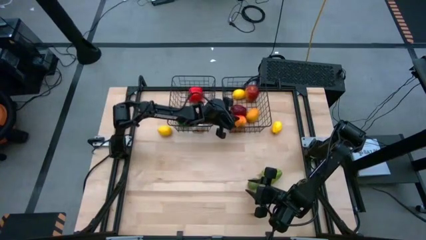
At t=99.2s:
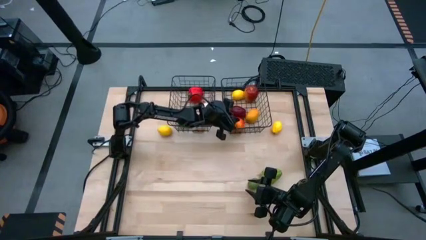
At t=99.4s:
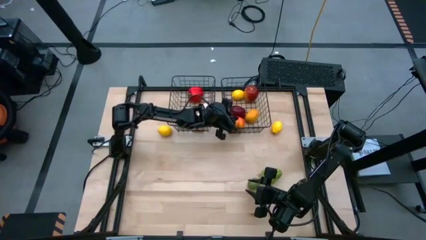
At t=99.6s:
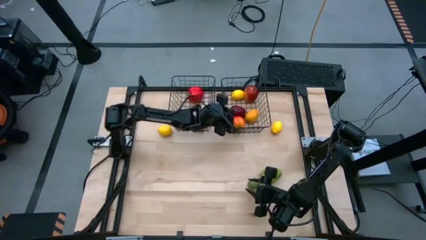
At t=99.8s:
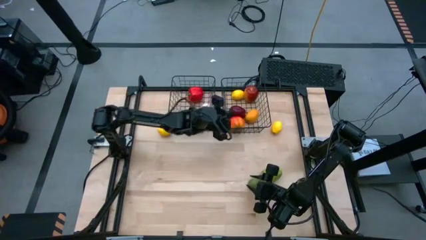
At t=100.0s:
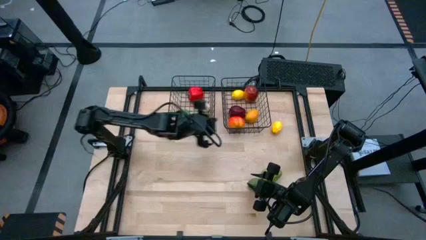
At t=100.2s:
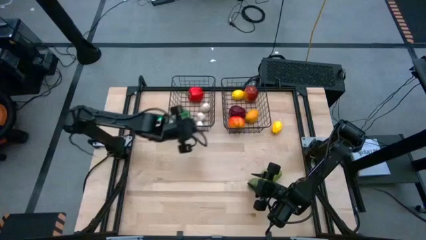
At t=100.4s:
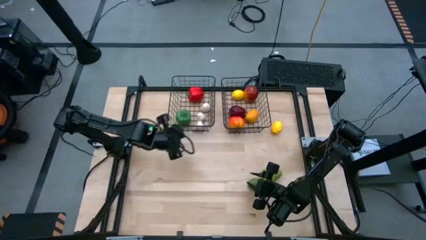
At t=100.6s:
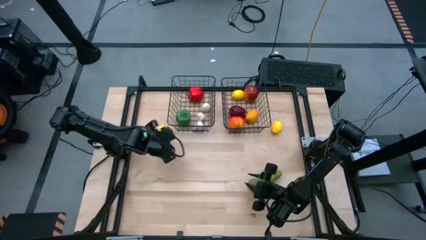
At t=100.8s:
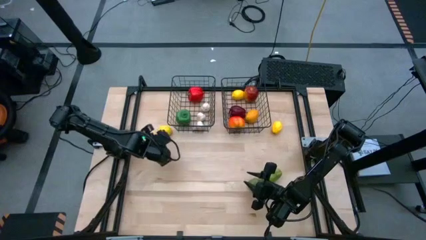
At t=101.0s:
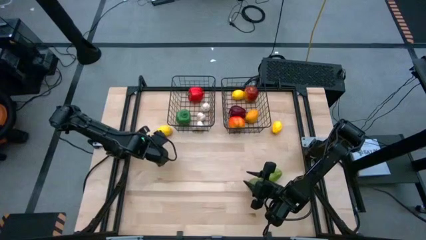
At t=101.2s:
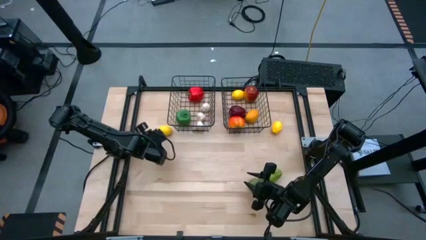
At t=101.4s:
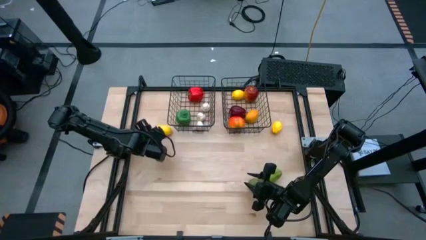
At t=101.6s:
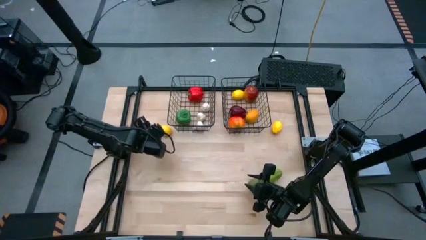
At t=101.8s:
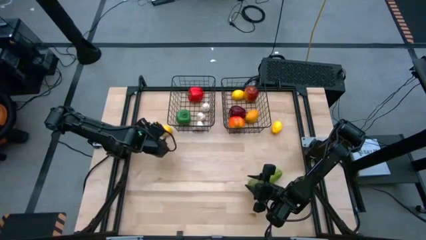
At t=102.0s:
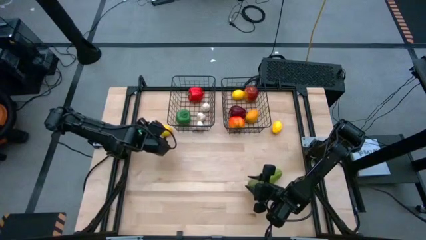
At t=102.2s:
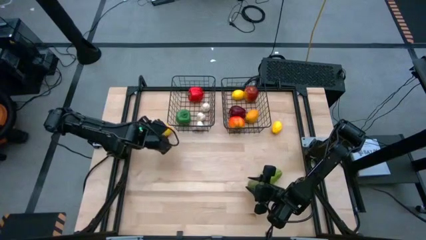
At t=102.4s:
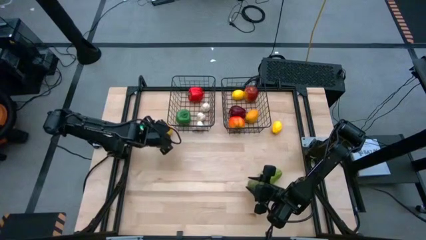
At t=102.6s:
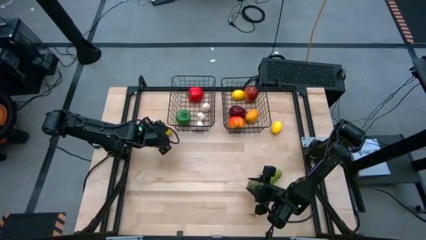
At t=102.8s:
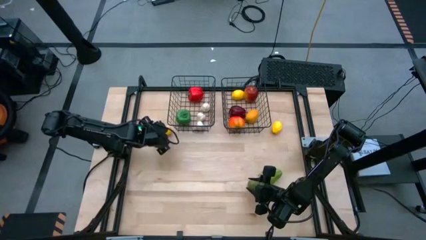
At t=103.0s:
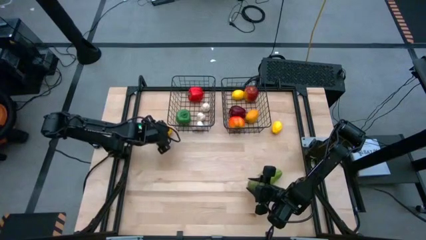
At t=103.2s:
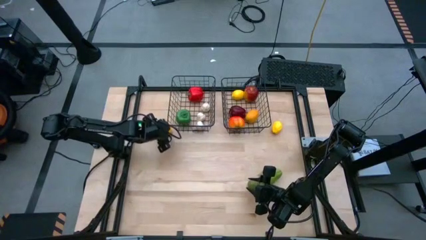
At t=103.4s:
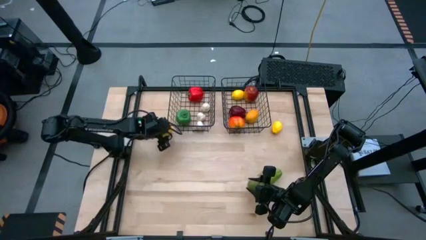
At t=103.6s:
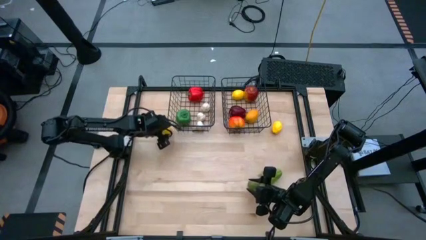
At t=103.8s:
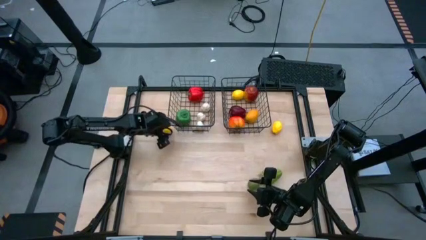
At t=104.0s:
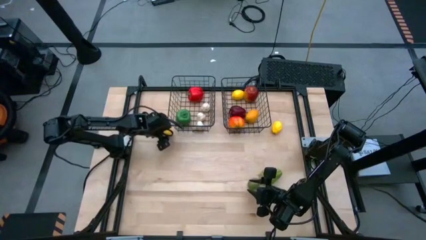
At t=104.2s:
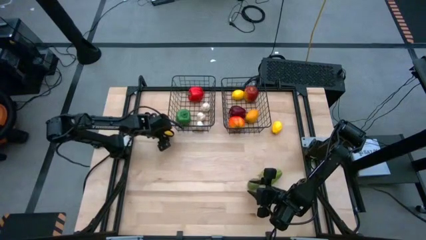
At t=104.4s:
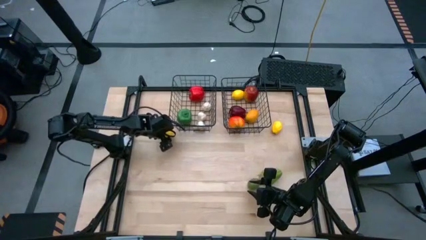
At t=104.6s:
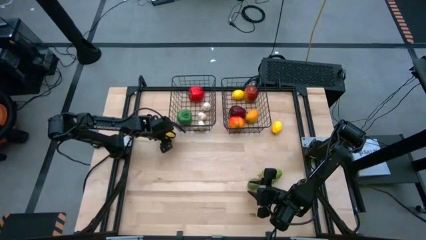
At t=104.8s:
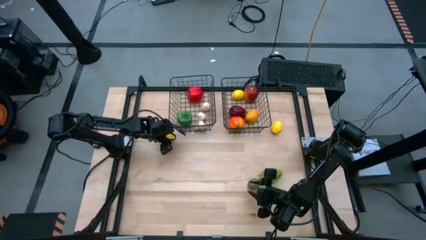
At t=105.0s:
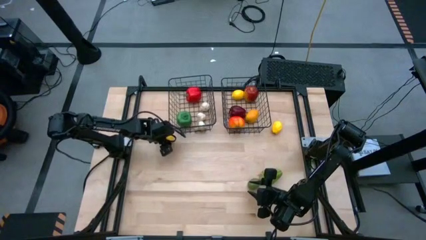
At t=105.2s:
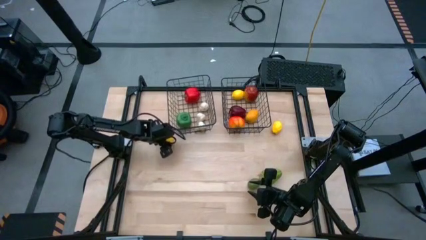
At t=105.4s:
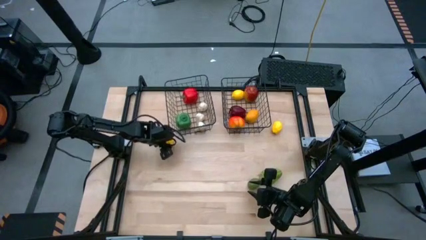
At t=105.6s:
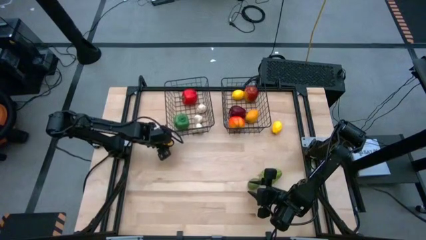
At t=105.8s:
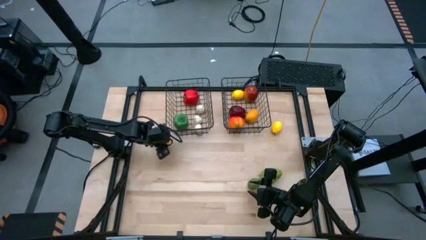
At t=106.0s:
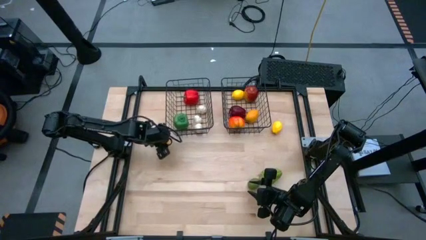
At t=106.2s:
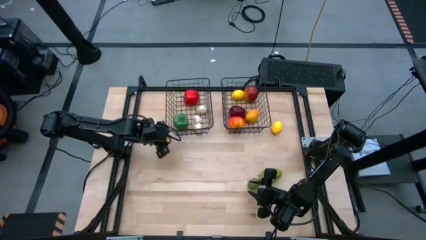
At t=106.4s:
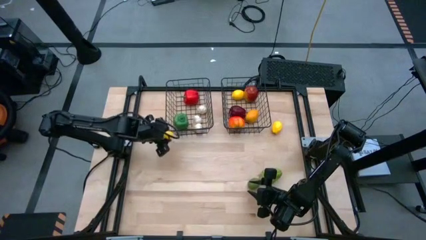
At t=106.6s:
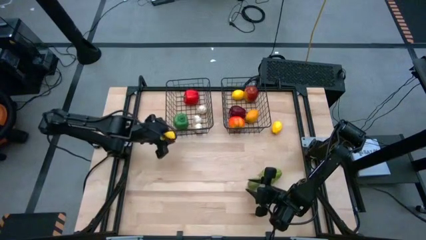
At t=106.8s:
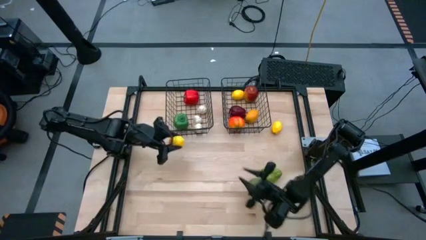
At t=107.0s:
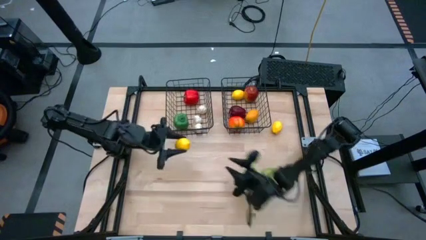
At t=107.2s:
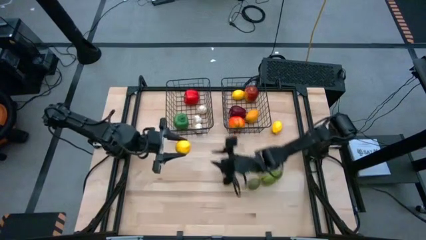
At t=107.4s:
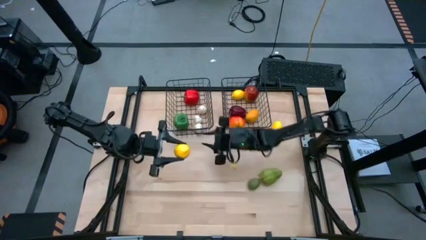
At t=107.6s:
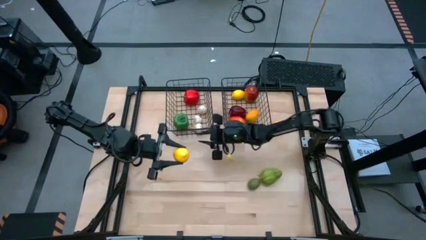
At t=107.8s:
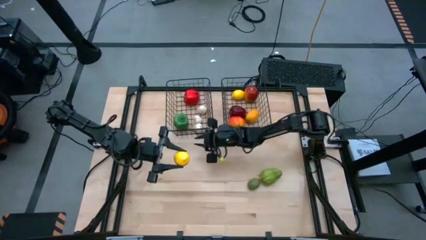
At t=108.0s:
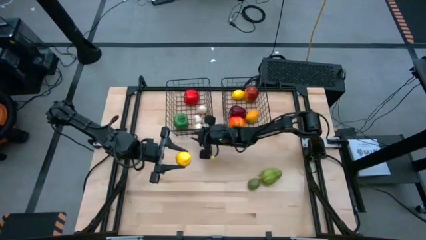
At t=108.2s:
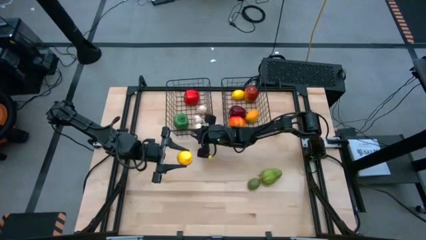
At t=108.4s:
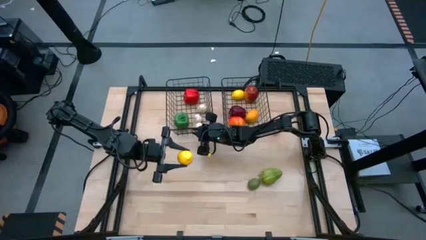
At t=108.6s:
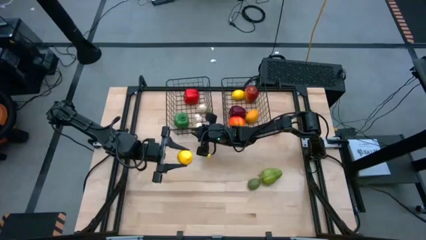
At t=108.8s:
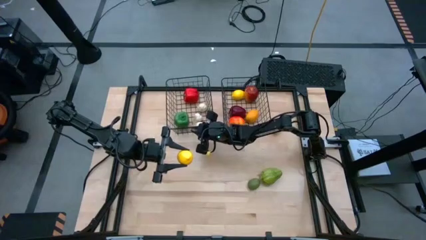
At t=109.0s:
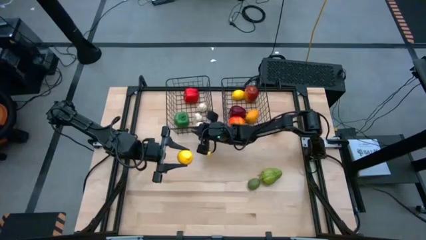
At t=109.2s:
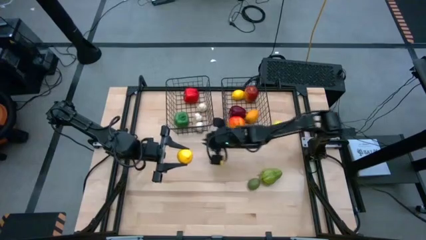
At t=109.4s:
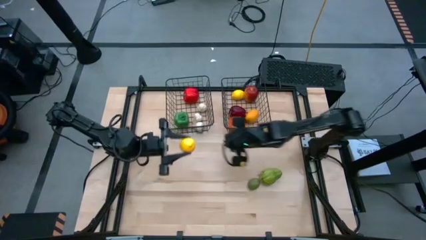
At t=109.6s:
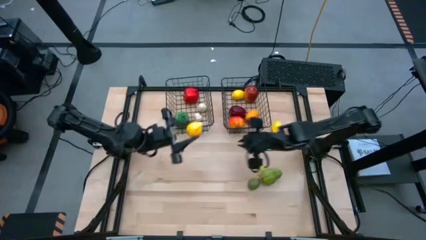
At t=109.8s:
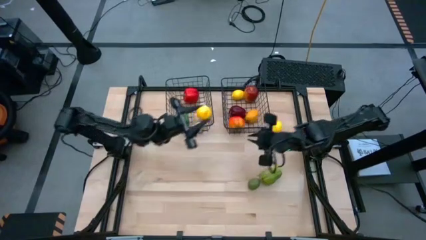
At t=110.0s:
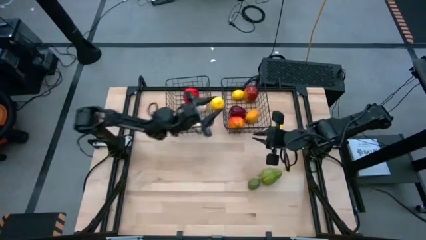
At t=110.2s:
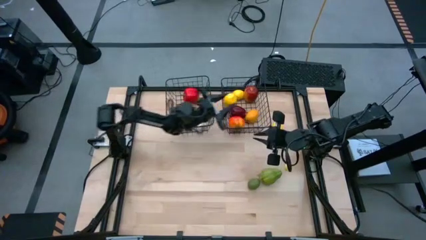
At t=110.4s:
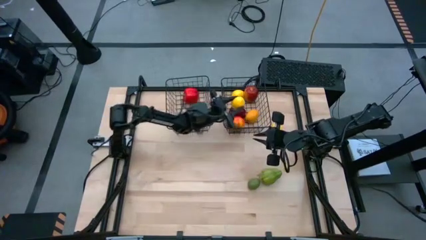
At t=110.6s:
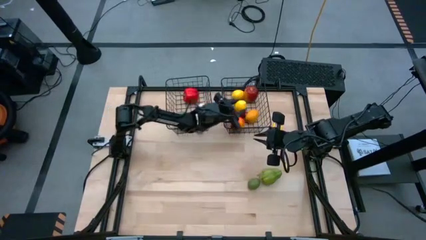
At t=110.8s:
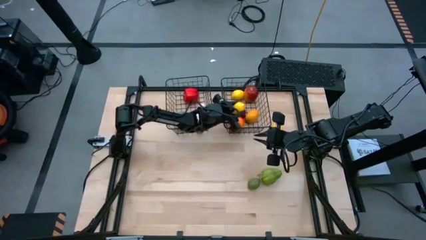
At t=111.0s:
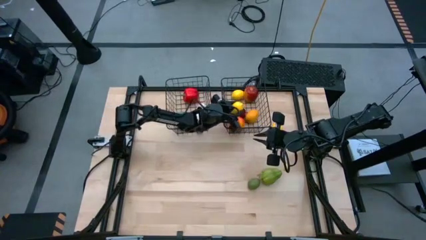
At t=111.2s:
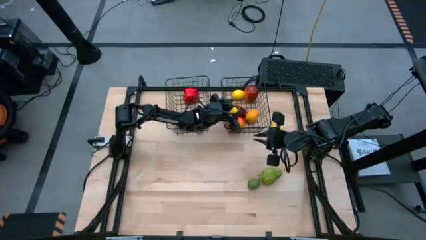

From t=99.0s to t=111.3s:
Task: Sort produce into baskets
Put the yellow lemon into the right wire basket

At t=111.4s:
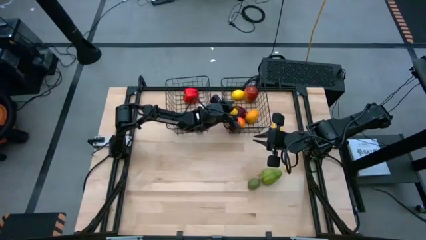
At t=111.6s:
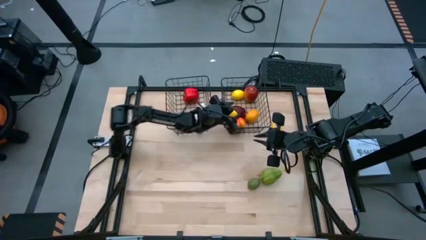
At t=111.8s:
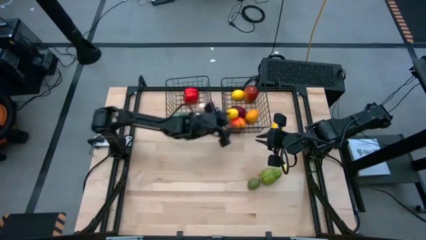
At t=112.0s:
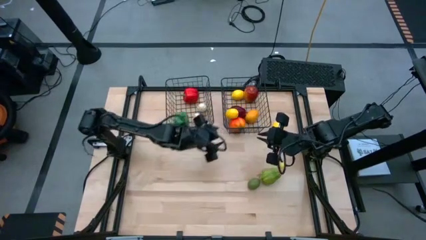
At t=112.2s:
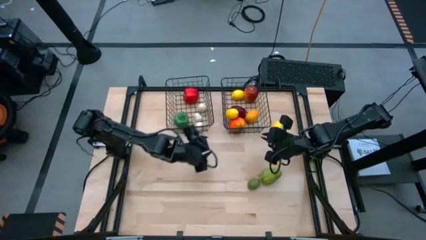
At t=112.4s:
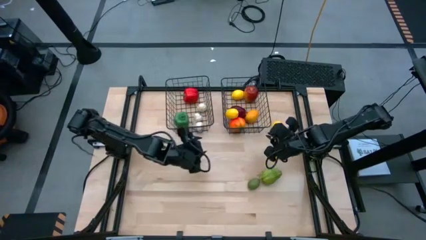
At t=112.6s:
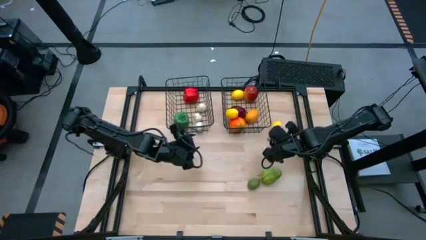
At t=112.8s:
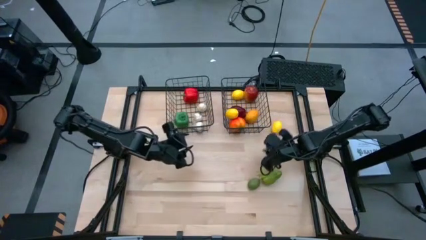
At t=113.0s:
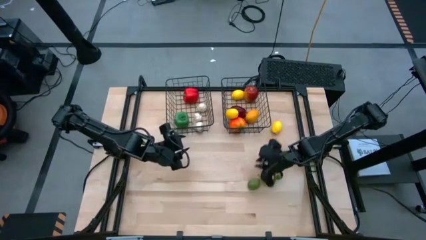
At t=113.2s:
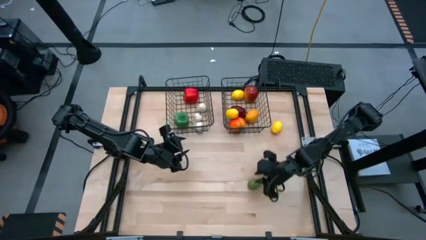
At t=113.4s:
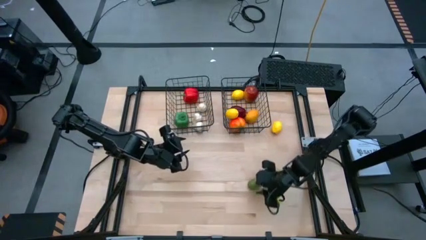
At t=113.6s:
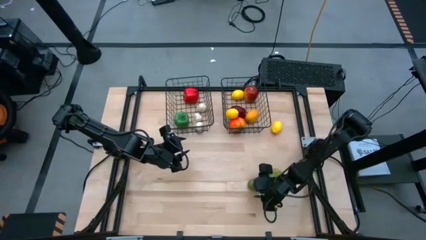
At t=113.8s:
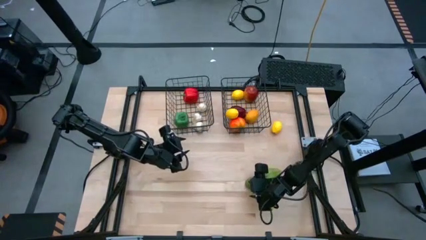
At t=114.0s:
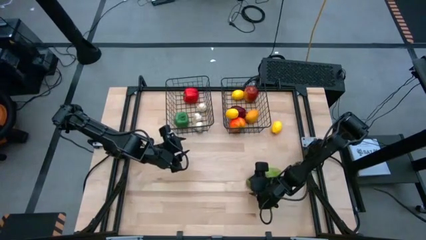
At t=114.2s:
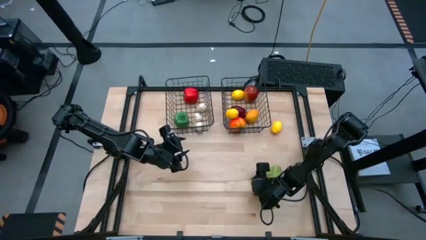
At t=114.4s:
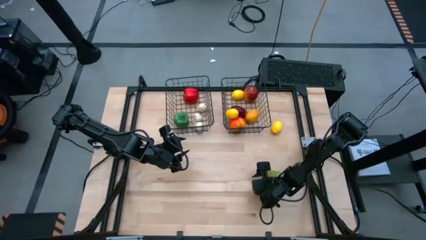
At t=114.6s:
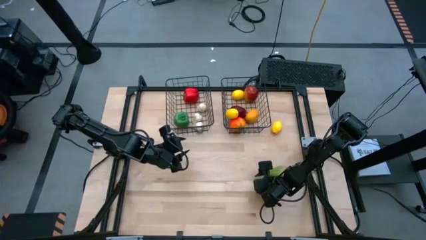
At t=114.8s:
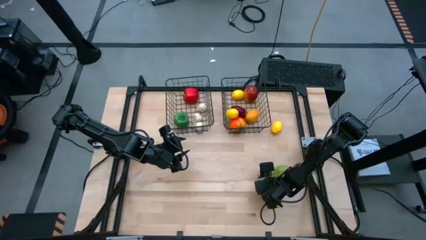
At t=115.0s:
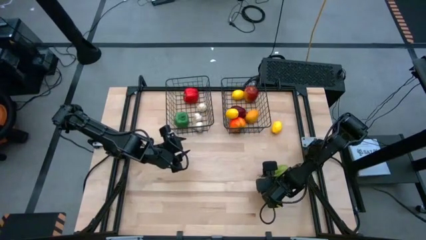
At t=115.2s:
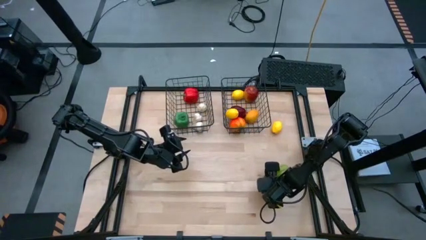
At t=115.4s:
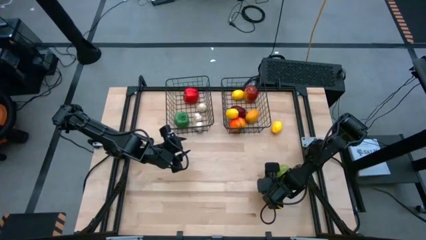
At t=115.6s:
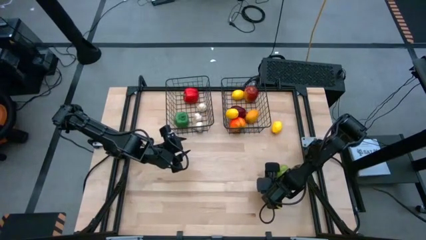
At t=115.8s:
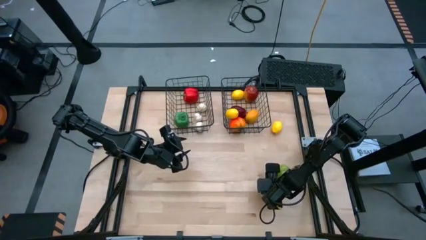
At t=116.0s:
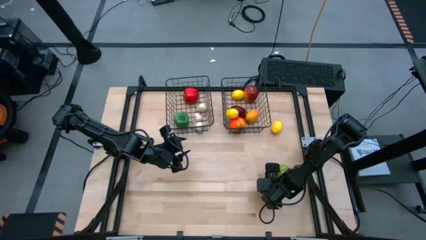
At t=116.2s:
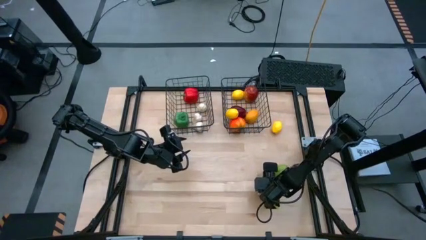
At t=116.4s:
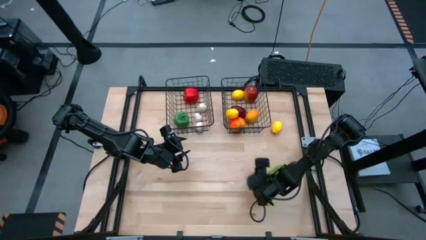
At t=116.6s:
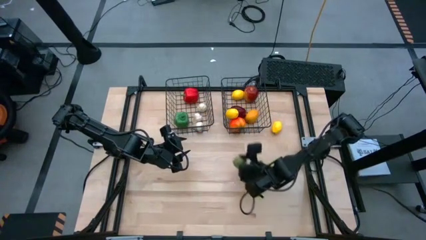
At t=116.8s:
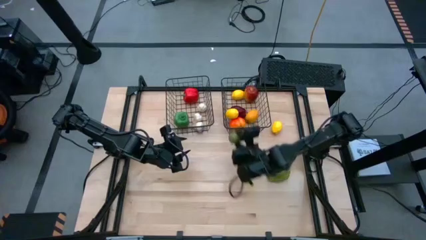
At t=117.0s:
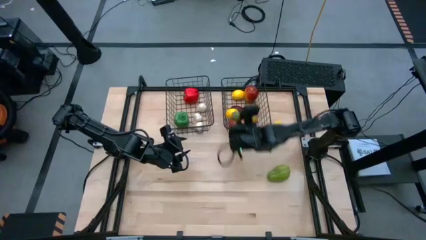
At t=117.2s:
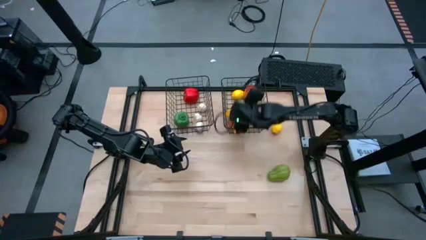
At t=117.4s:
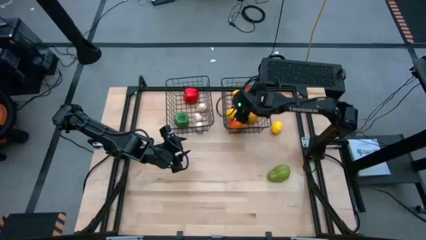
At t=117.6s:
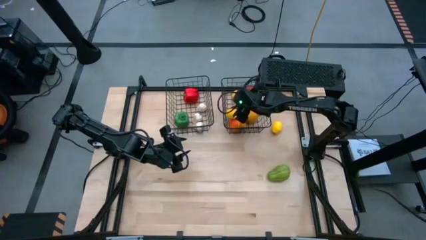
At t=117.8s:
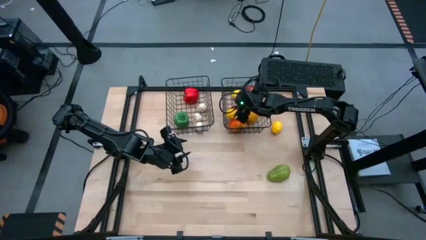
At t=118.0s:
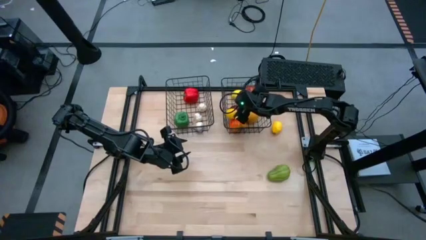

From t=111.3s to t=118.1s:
Put the green lime into the right wire basket
